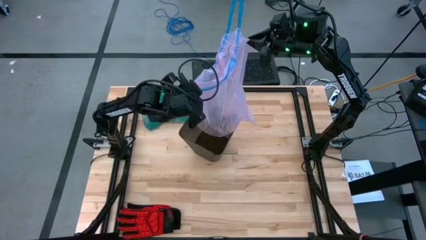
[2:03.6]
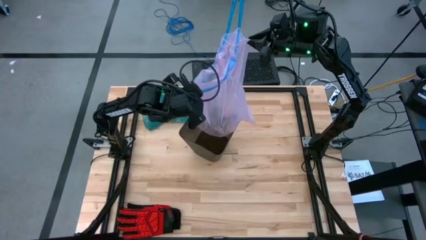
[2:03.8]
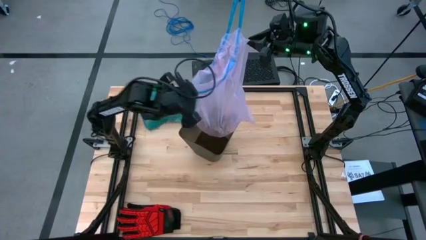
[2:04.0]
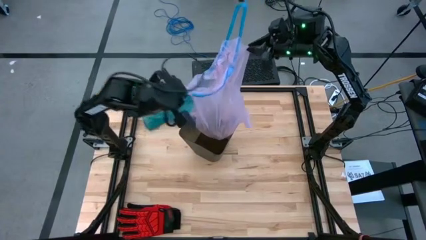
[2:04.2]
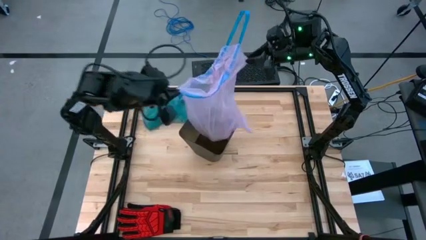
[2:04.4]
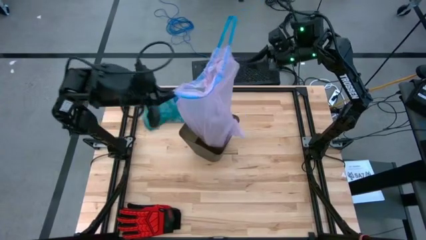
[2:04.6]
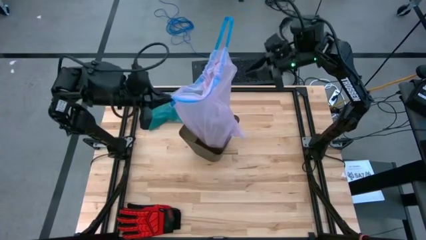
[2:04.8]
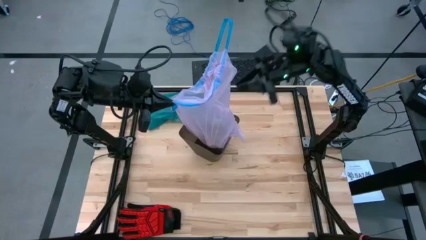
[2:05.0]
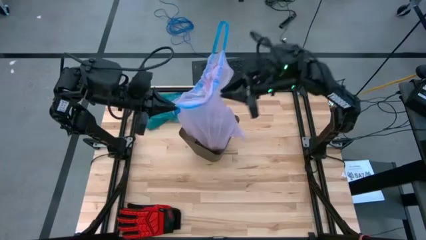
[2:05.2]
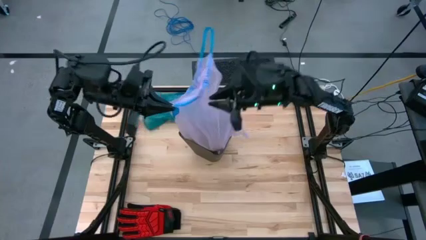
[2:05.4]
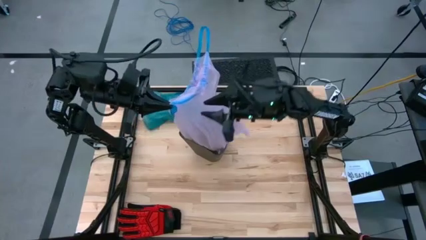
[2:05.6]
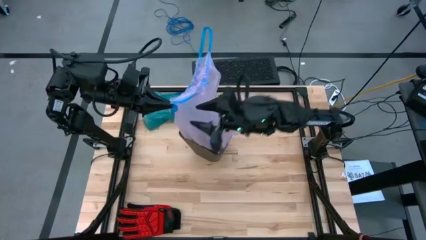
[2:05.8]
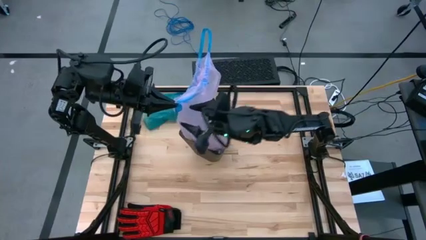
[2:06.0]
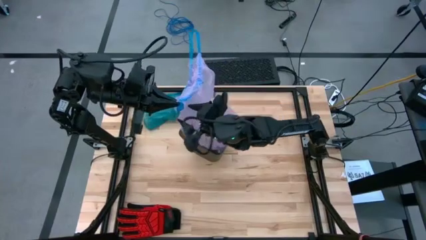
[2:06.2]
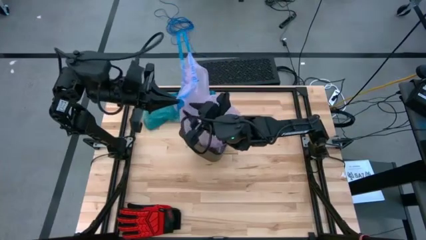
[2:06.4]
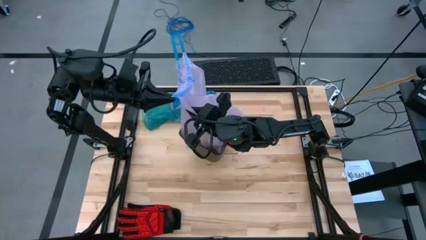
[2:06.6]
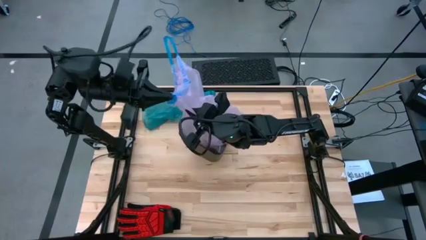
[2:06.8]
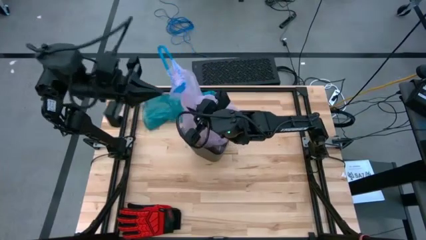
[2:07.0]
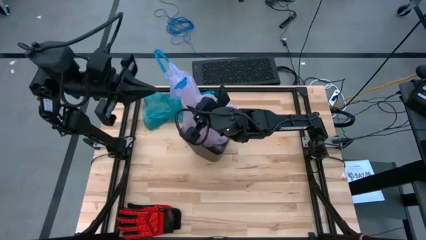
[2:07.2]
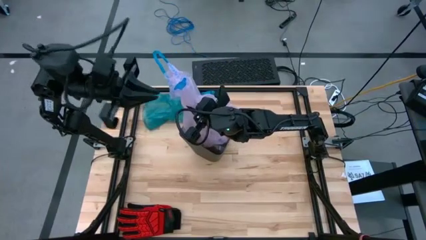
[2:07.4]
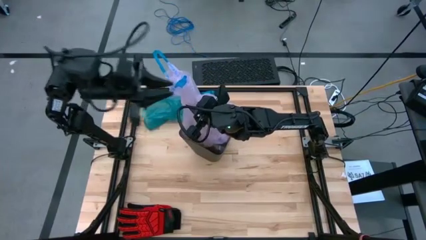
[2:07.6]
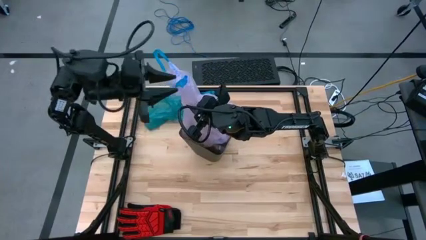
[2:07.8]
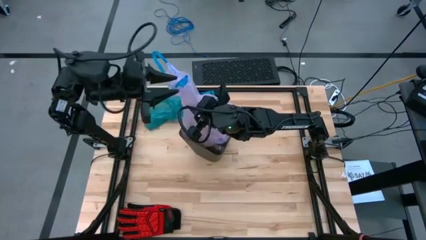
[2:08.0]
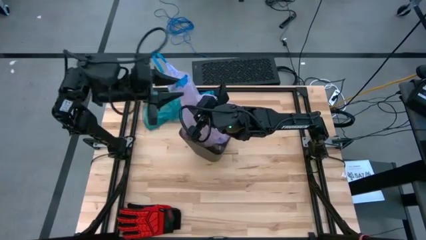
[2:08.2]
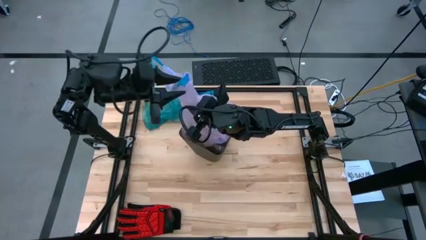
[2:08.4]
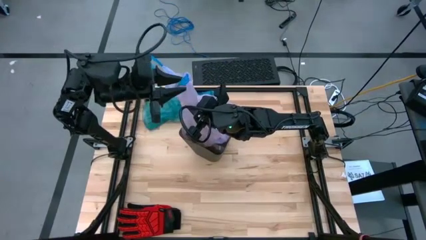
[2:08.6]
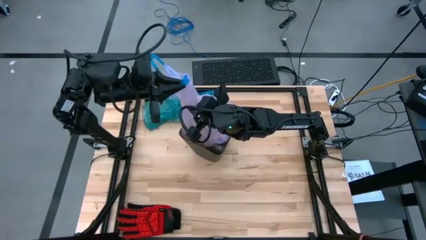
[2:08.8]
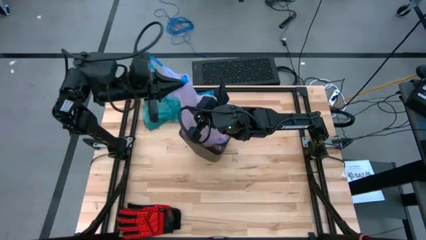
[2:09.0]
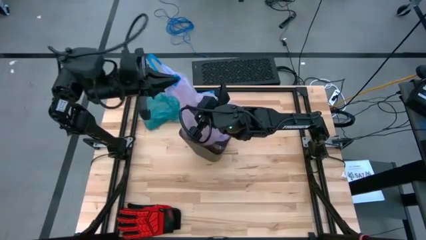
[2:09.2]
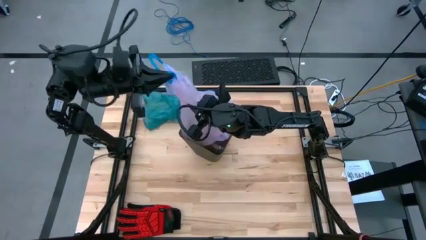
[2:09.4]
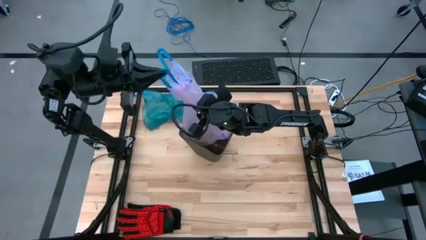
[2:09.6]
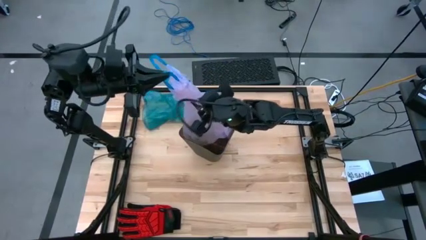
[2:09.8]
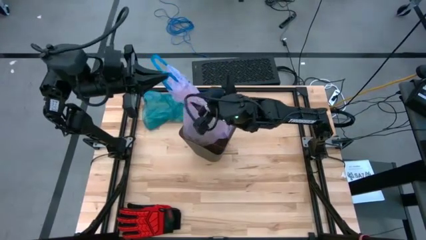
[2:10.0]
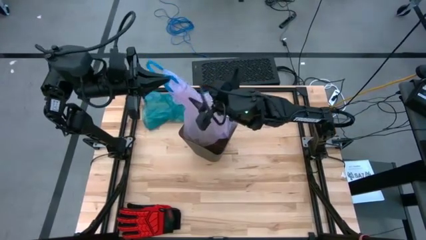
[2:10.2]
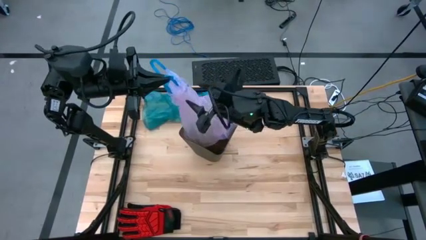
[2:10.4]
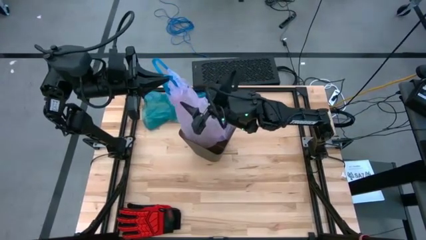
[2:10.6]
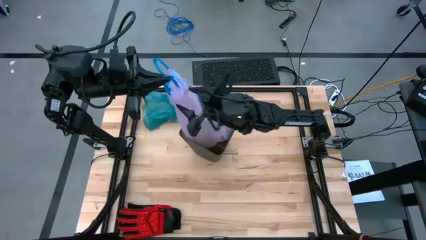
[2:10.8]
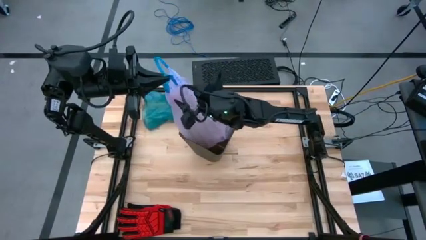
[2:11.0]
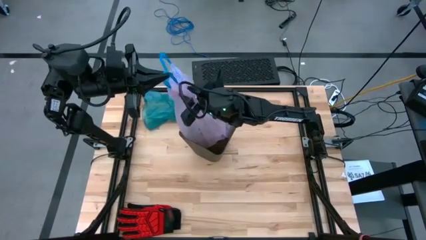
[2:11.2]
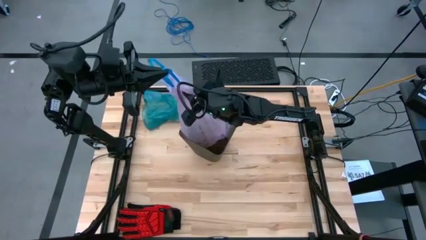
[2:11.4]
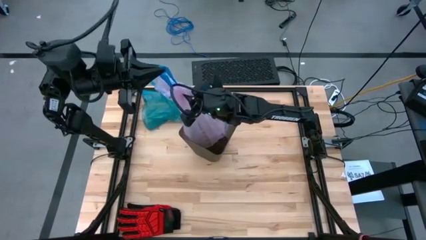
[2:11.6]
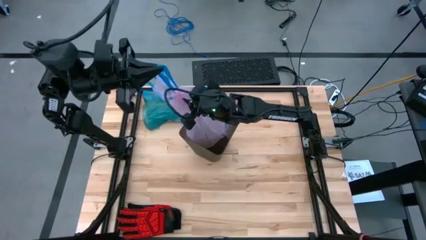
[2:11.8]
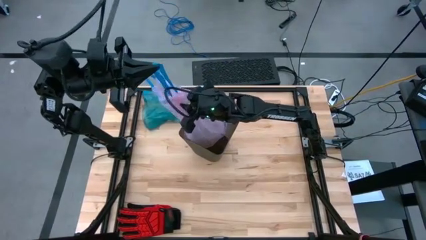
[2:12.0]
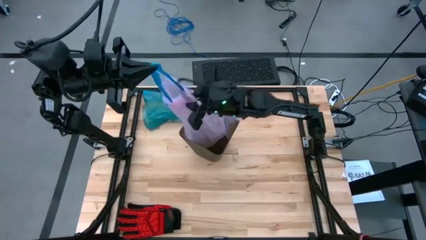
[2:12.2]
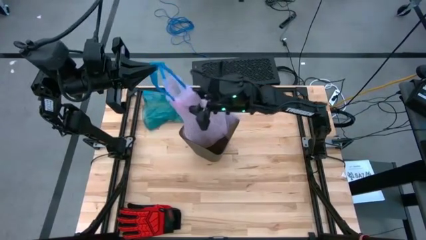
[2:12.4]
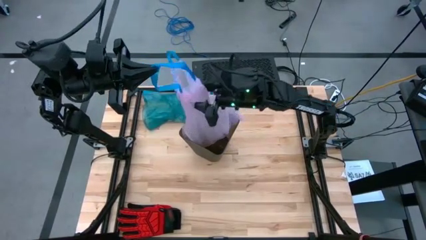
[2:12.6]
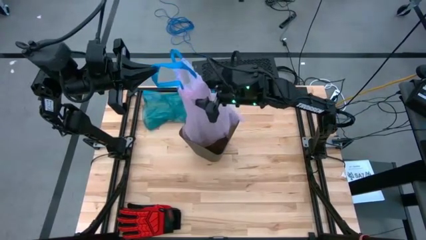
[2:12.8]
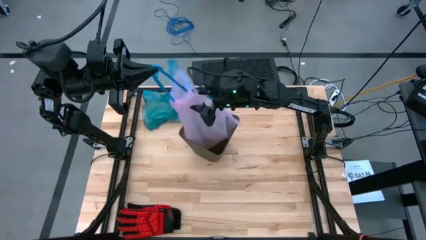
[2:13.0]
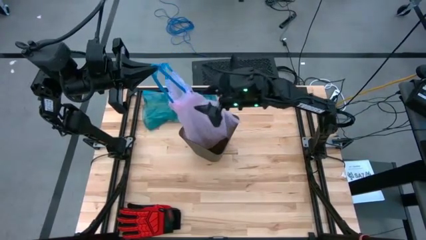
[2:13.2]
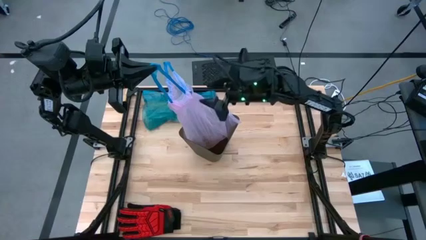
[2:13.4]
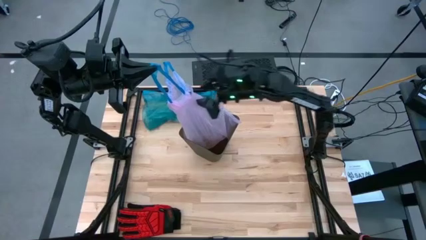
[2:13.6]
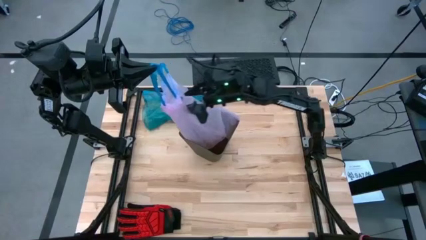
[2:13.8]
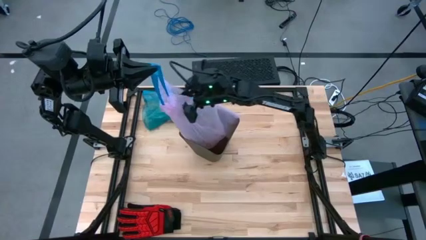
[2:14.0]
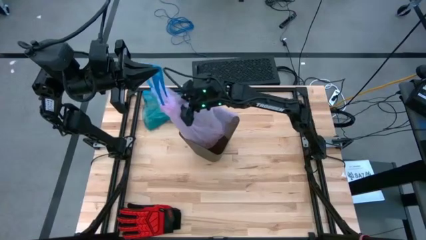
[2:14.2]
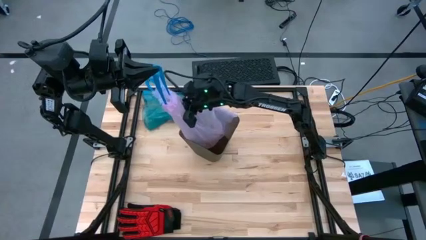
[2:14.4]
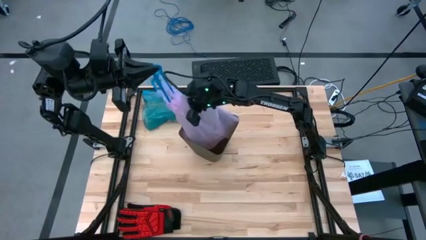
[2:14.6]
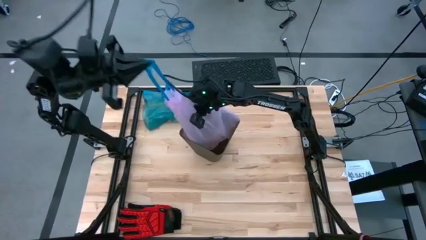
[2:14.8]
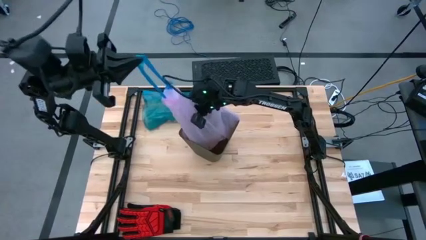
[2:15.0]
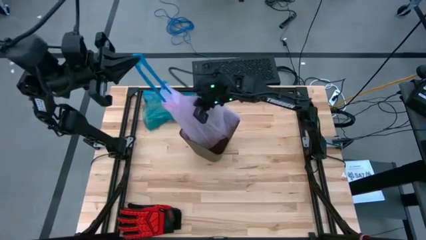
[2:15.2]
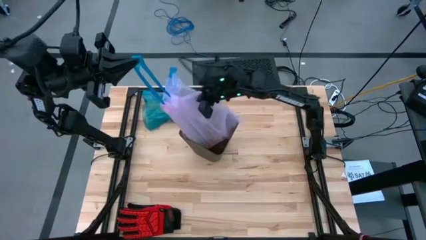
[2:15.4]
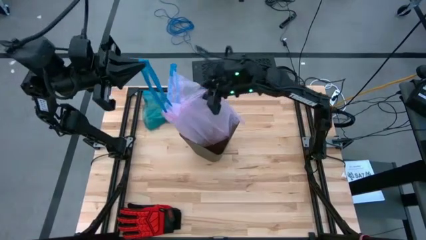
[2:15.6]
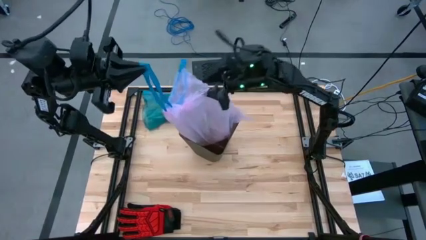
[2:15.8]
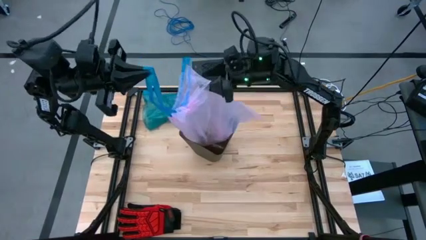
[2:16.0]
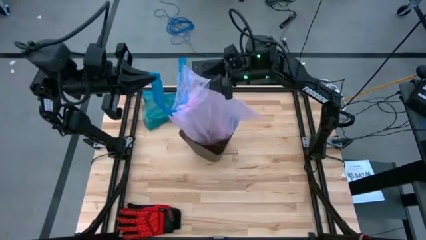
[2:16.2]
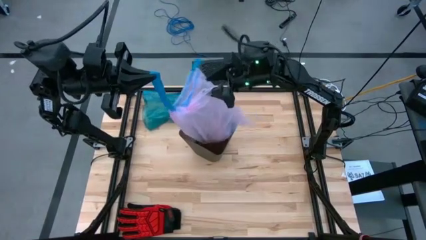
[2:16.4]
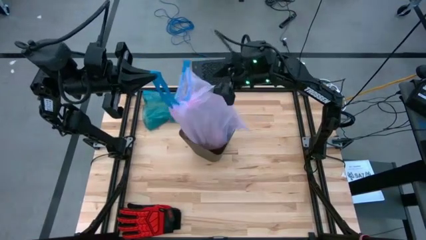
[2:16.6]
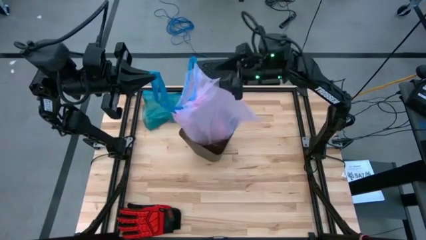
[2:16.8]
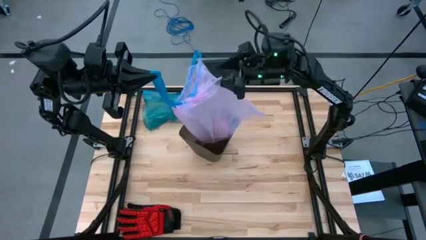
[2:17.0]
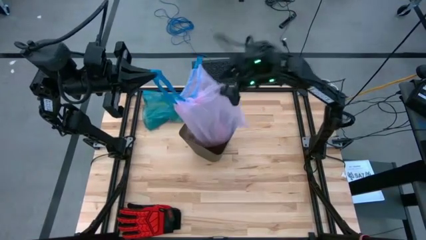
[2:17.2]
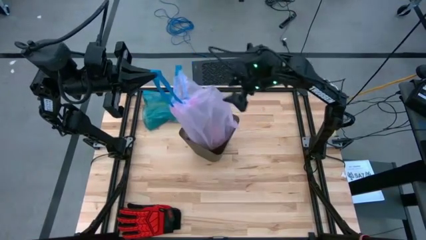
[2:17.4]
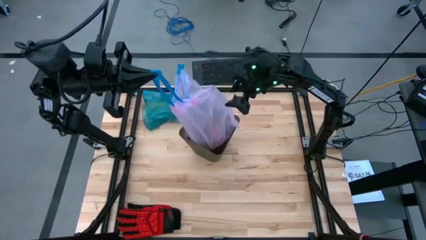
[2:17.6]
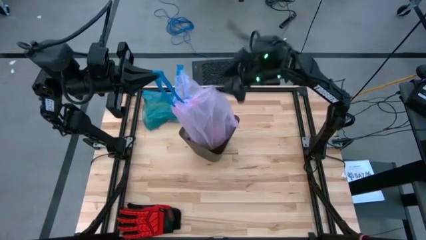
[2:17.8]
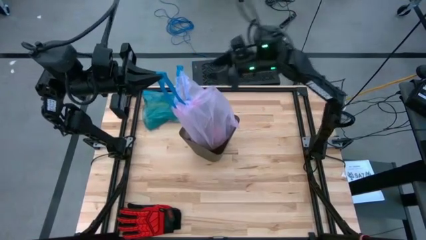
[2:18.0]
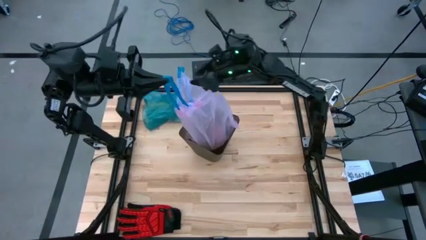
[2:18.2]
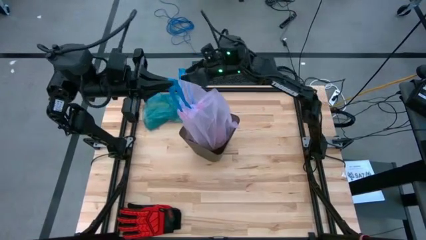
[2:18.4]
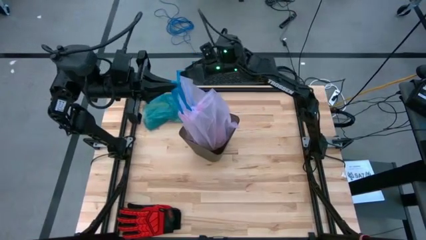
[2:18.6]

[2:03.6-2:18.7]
Task: place trash/remove bag and relplace
Remove the pink trash bag from the black trash bin
